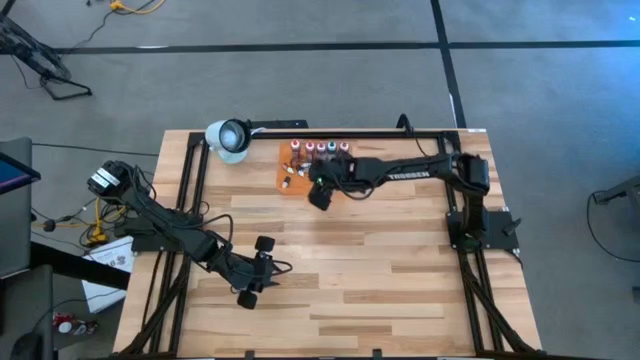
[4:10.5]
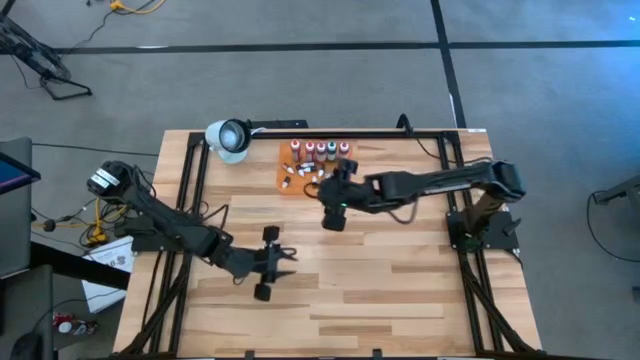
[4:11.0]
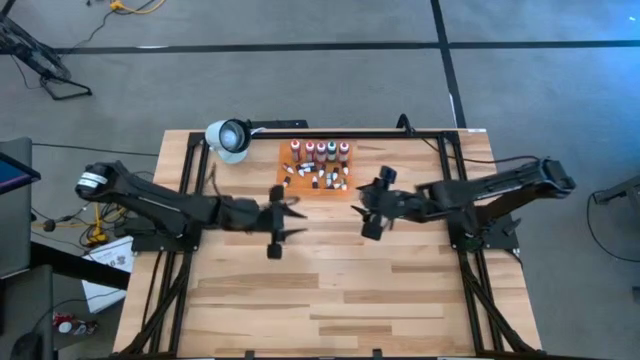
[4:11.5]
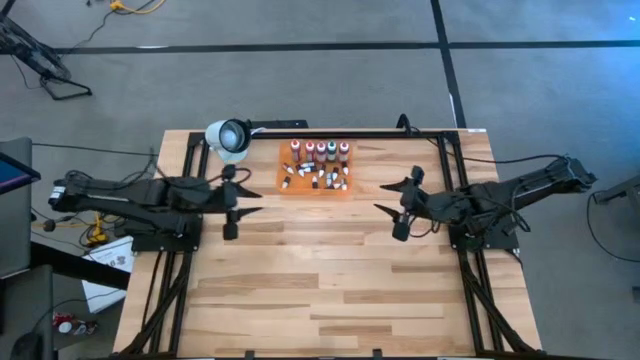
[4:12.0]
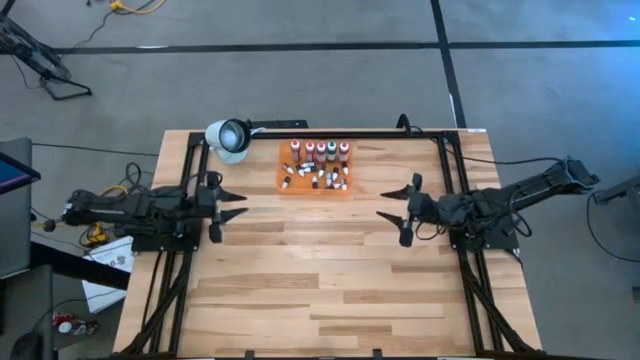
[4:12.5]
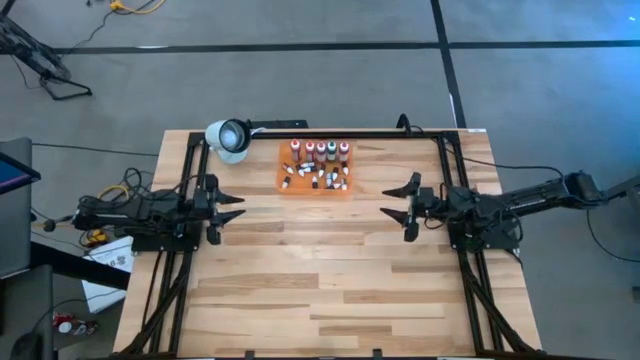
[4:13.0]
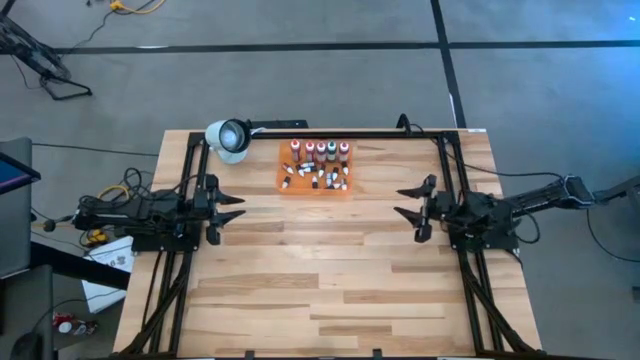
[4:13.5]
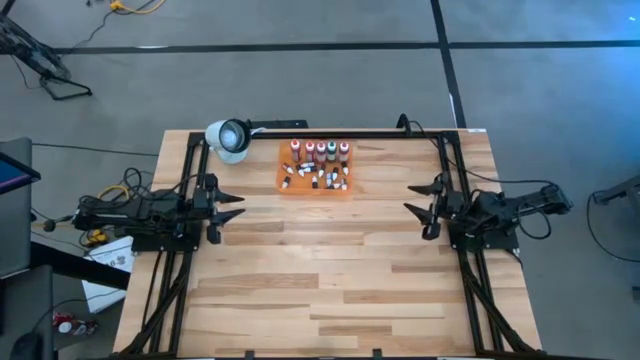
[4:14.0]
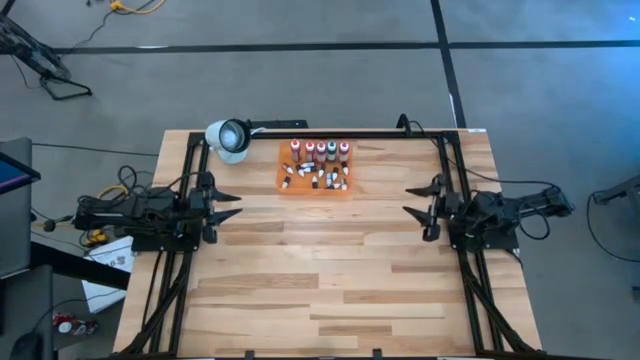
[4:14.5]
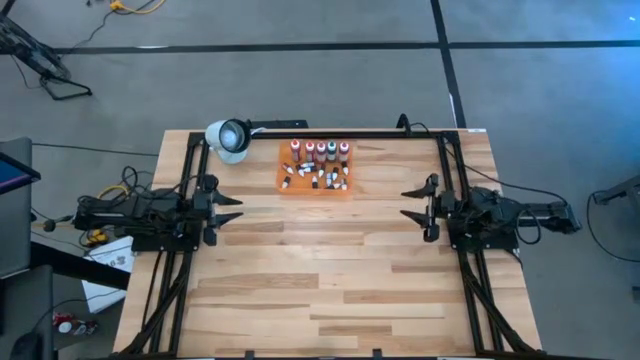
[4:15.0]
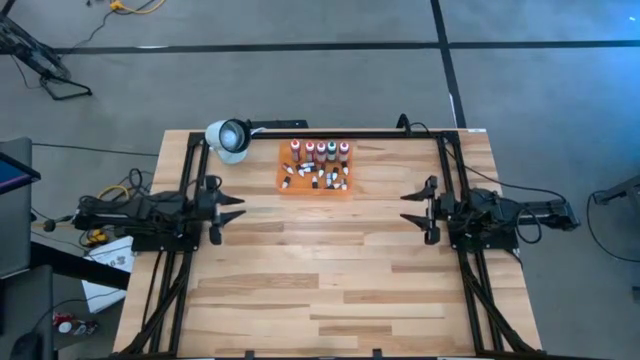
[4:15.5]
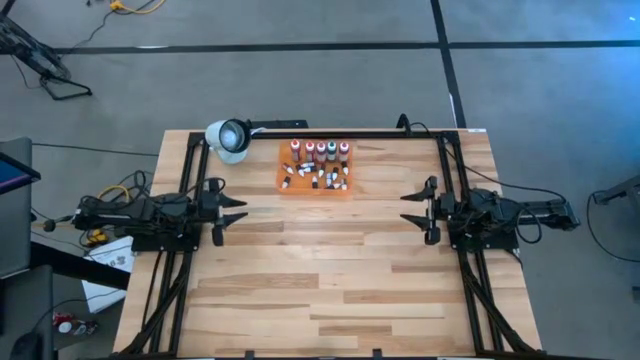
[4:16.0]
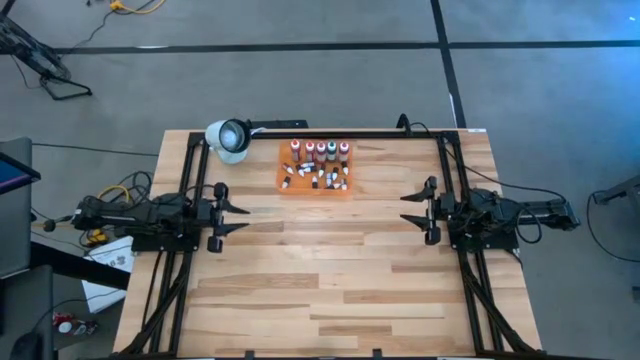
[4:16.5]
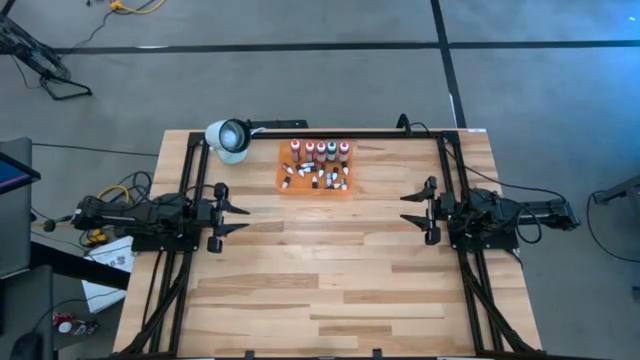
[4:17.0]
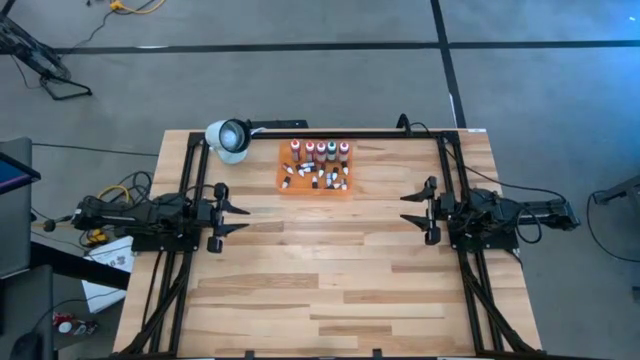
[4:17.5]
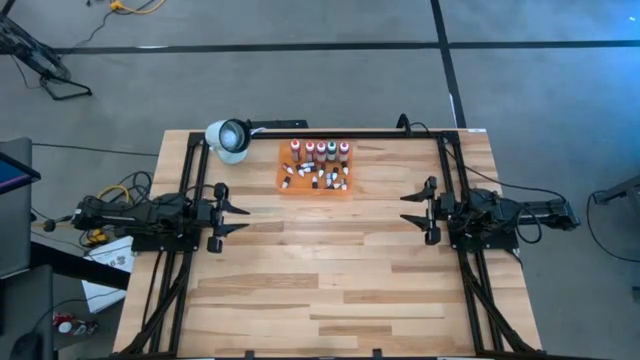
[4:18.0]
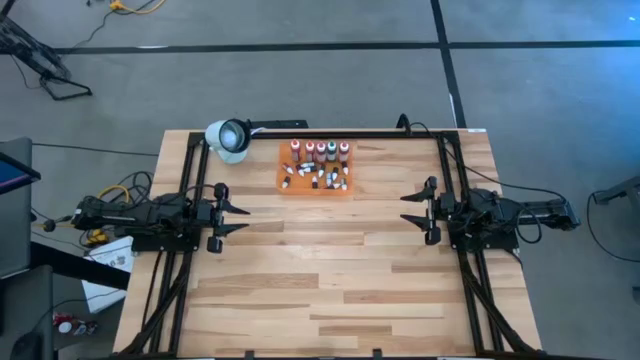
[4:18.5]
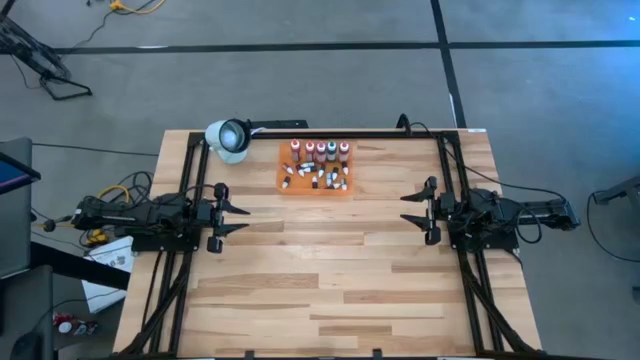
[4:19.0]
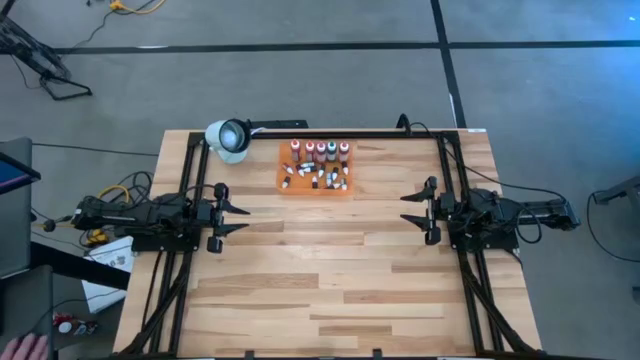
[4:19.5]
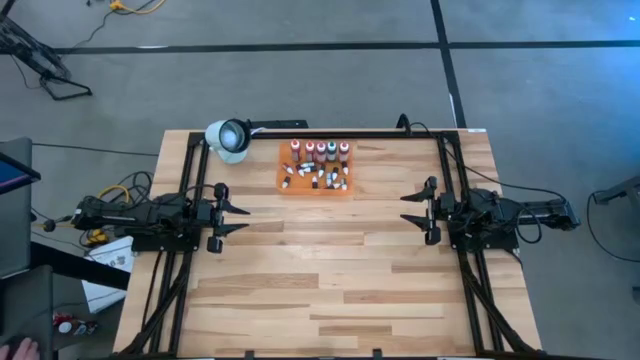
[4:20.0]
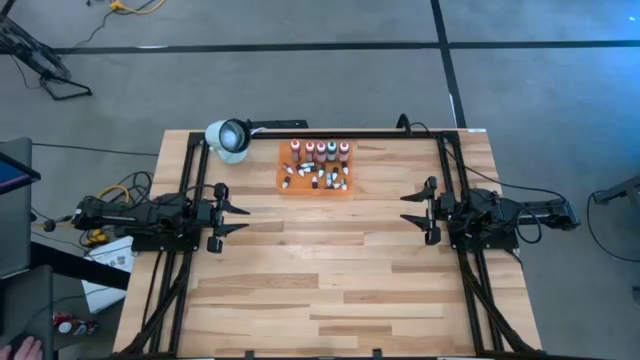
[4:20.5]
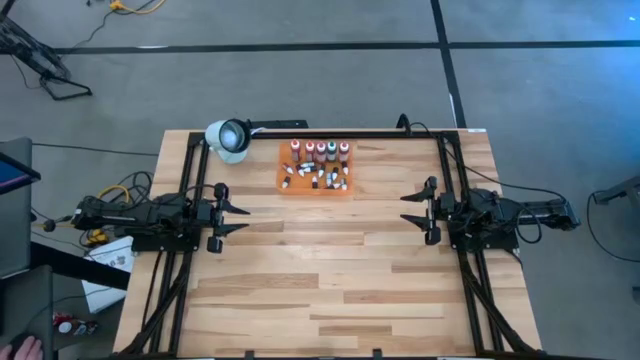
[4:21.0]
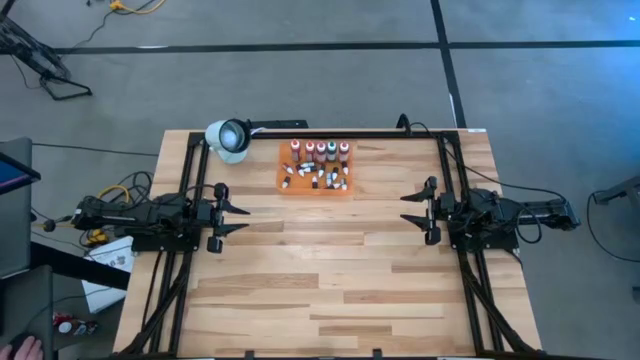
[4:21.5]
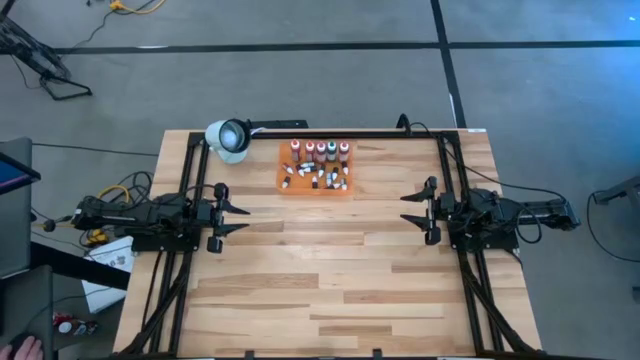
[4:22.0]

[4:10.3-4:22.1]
Task: Pick & Place food coloring
Return to Home Position

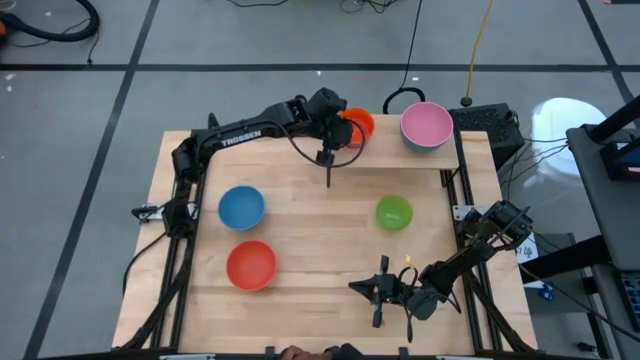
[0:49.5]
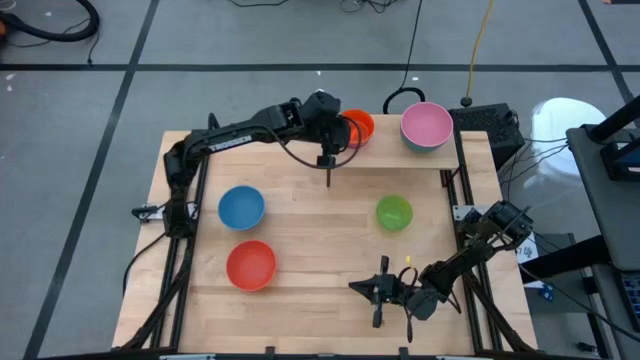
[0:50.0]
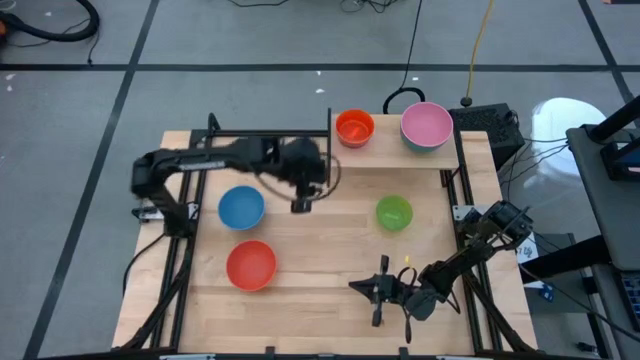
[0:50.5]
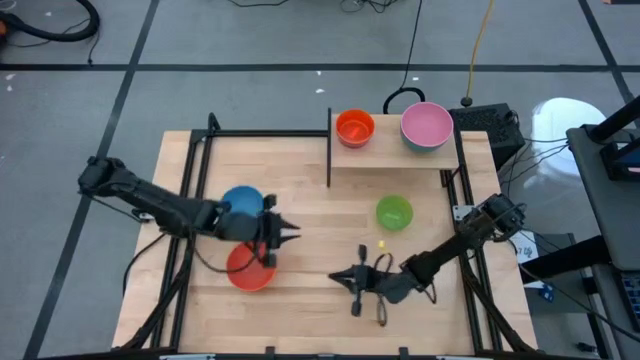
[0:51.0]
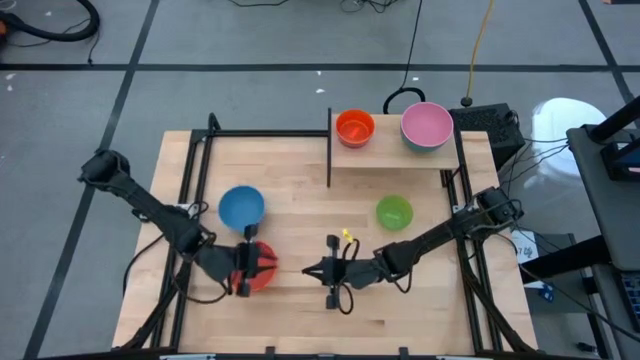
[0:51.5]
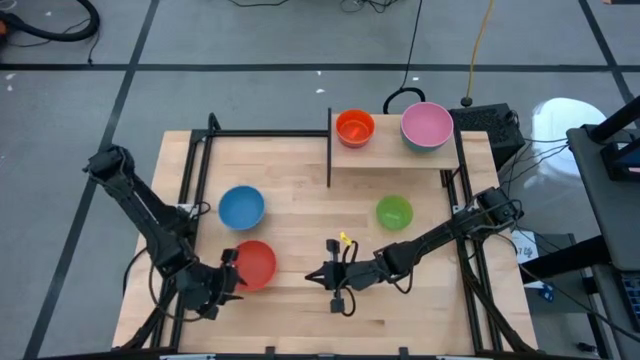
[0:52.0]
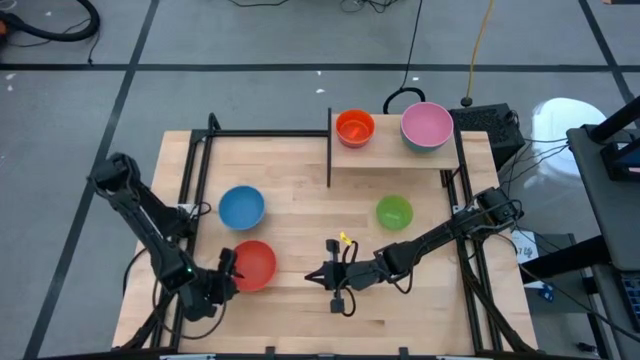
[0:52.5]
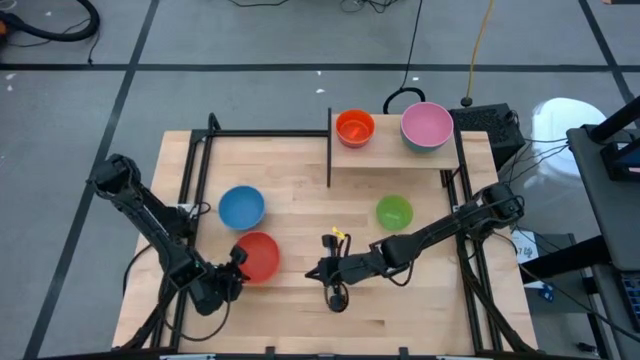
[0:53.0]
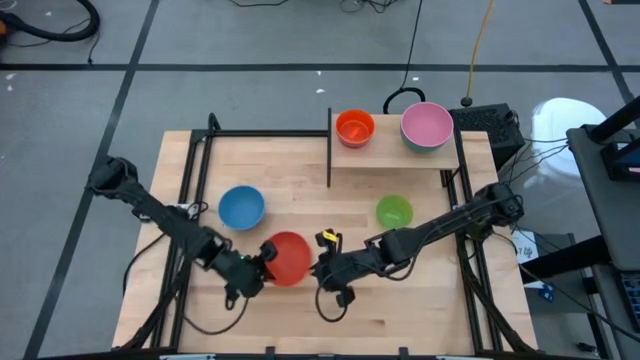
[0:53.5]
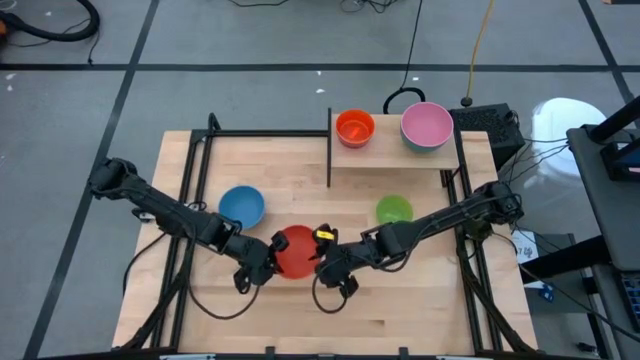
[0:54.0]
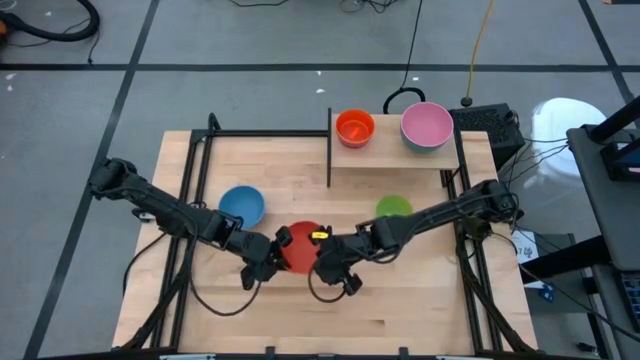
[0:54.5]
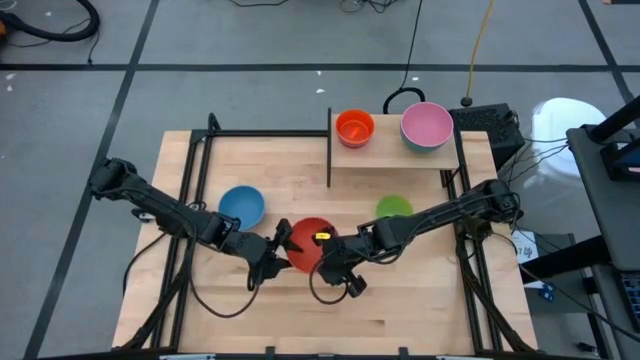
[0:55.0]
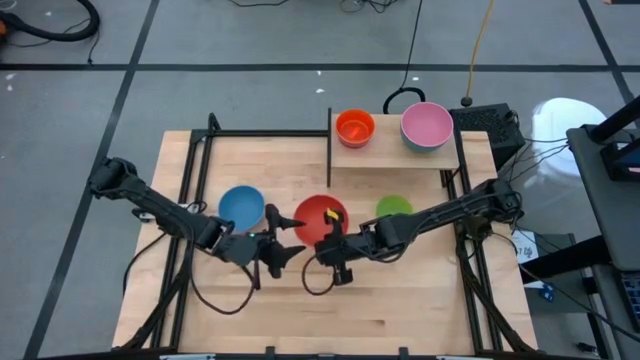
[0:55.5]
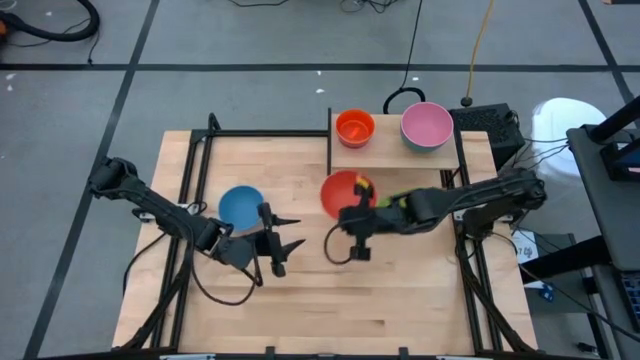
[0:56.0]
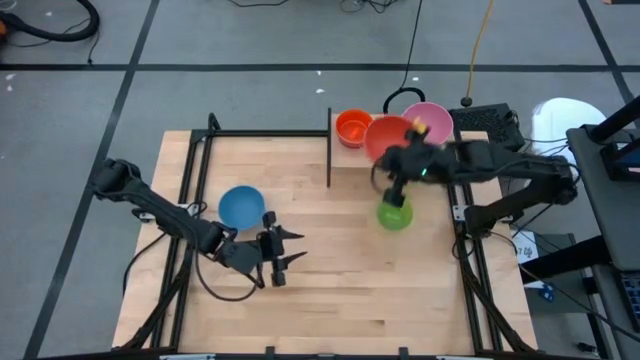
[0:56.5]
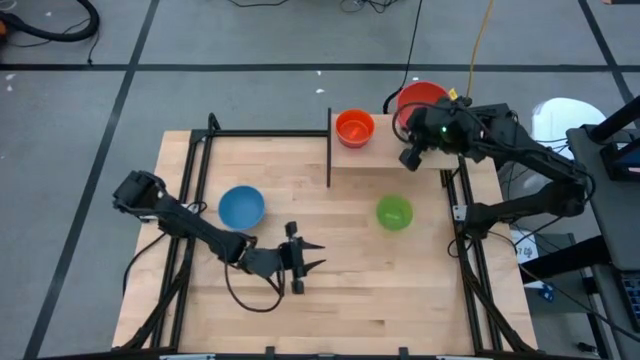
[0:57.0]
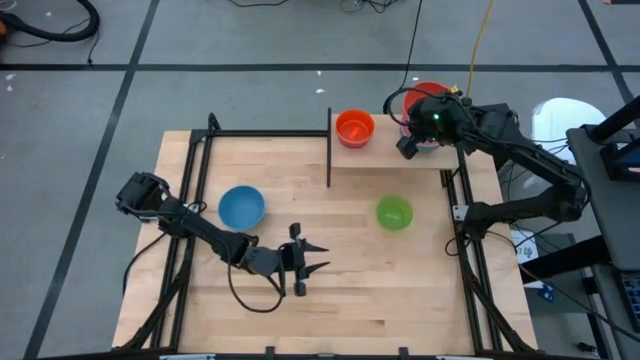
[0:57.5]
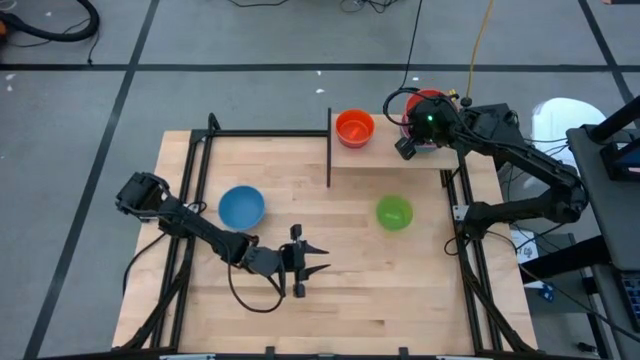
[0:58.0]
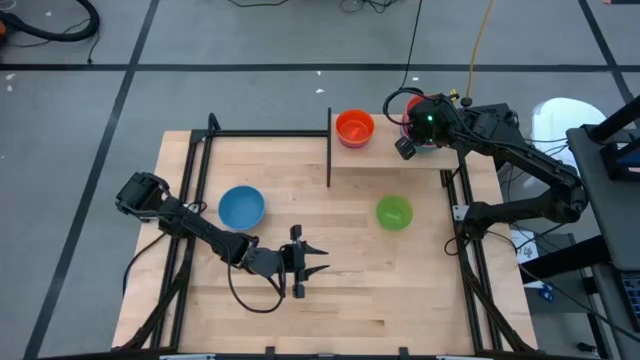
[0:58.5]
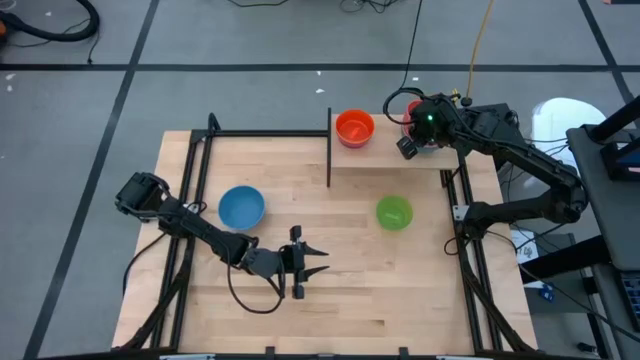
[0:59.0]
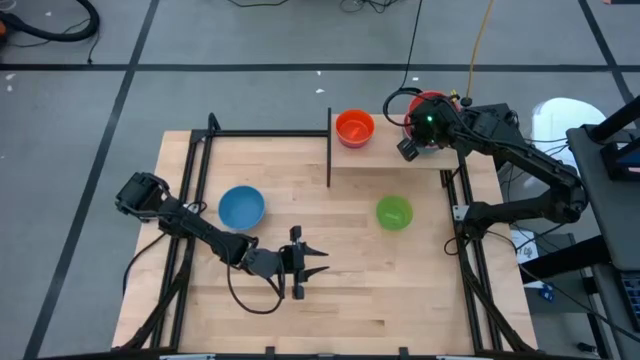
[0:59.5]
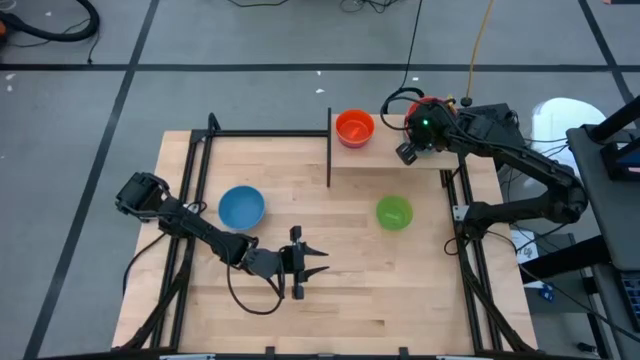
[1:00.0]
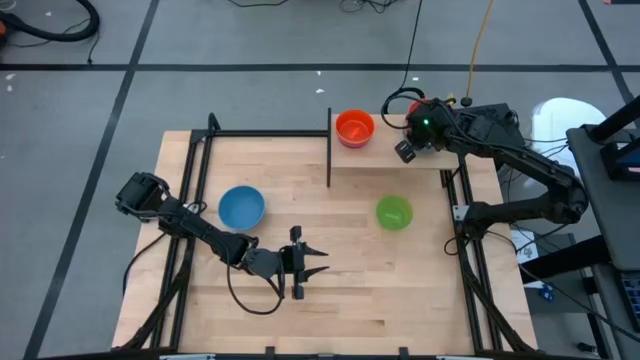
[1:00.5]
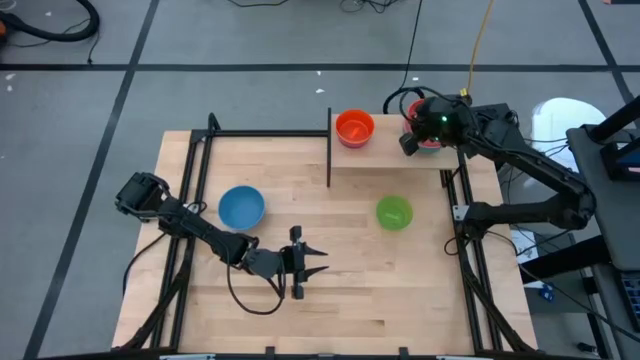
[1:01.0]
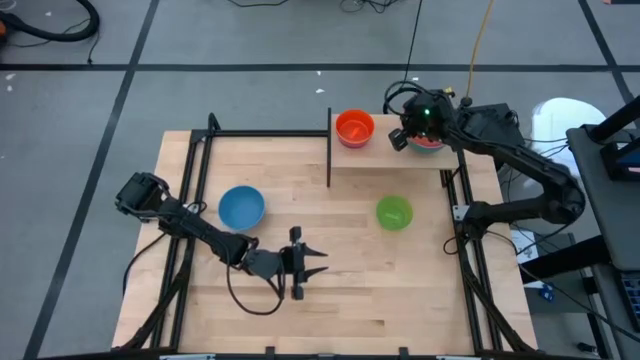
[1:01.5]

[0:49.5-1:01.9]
Task: Place and stack bowls onto a shelf
Stack the large orange bowl on top of the large pink bowl on the shelf
